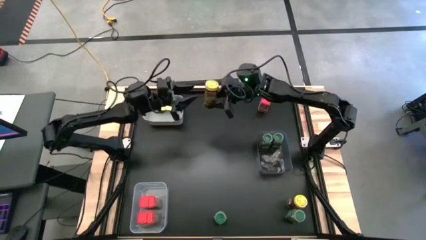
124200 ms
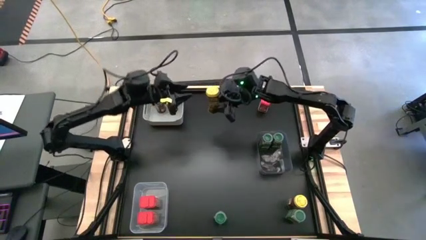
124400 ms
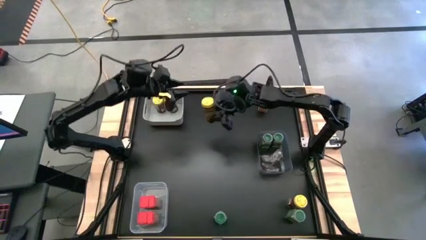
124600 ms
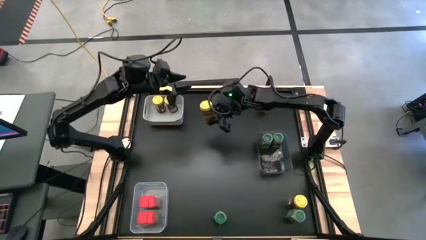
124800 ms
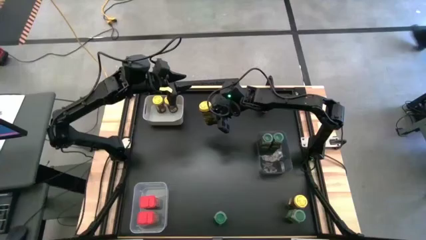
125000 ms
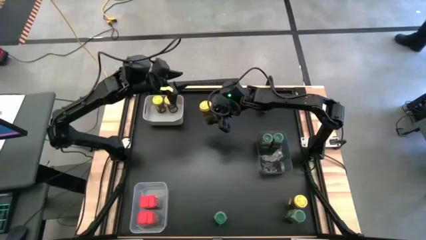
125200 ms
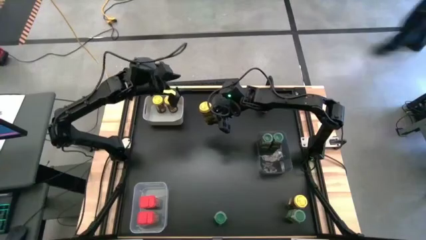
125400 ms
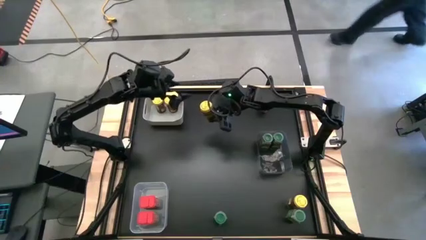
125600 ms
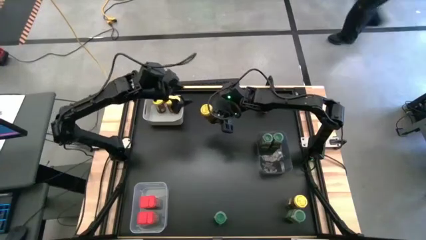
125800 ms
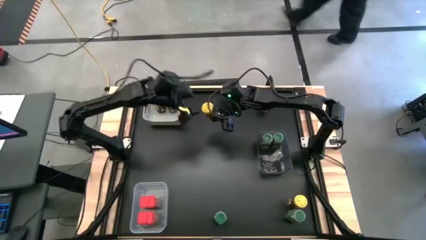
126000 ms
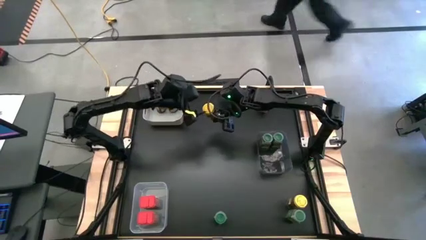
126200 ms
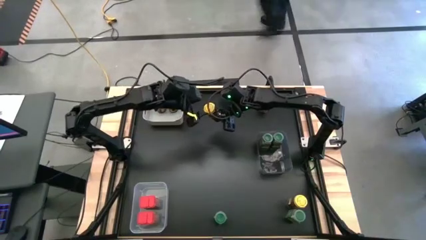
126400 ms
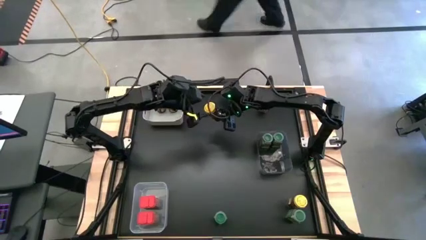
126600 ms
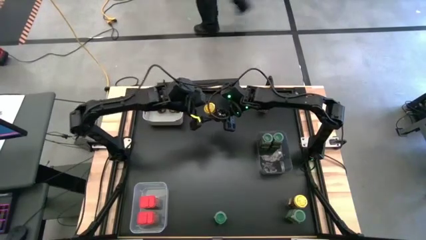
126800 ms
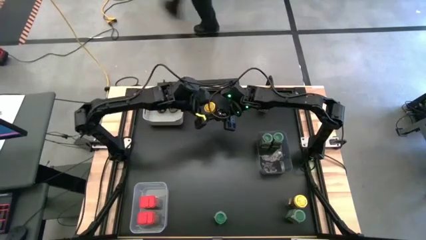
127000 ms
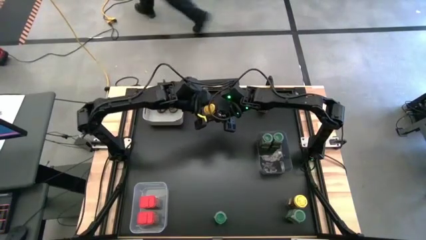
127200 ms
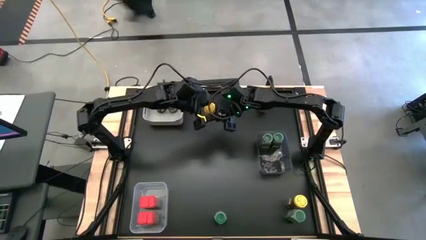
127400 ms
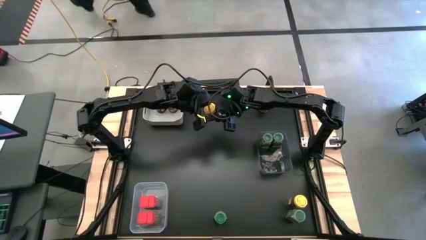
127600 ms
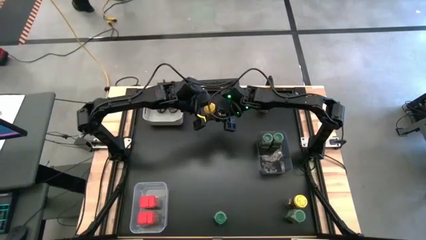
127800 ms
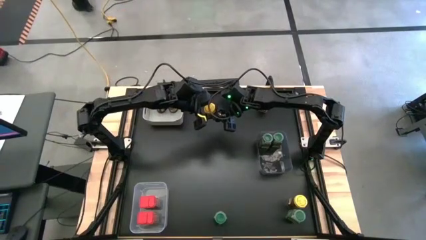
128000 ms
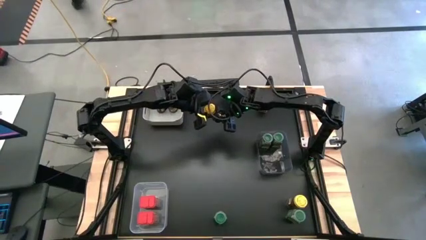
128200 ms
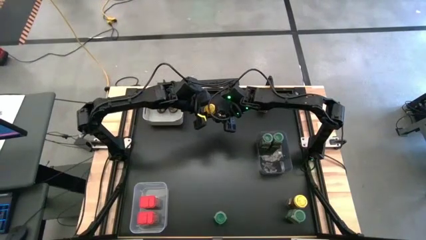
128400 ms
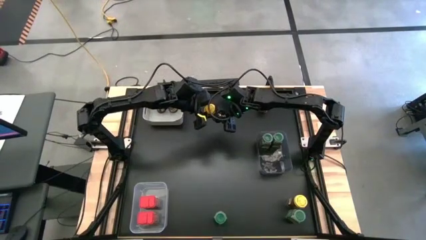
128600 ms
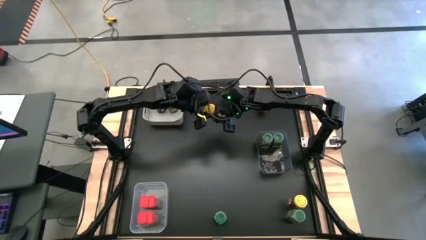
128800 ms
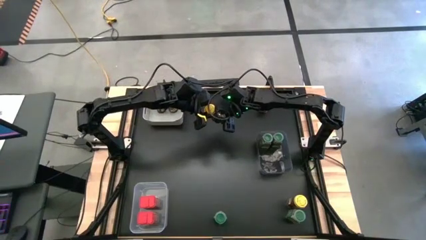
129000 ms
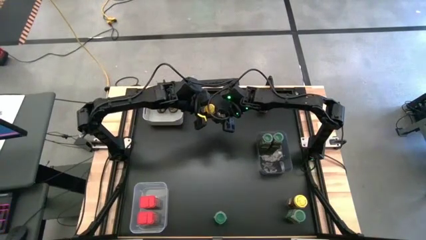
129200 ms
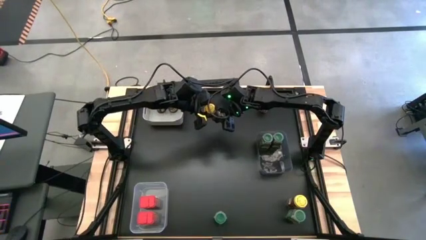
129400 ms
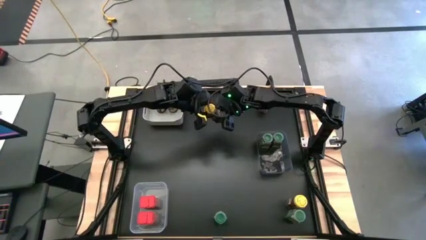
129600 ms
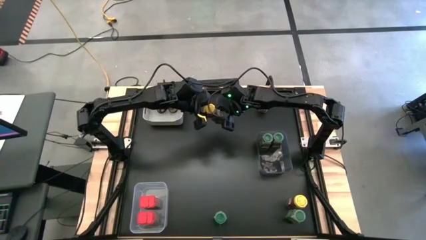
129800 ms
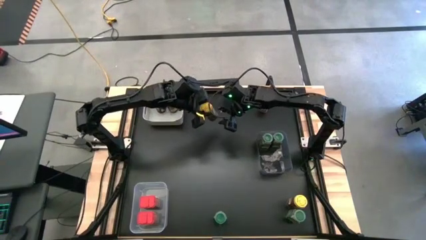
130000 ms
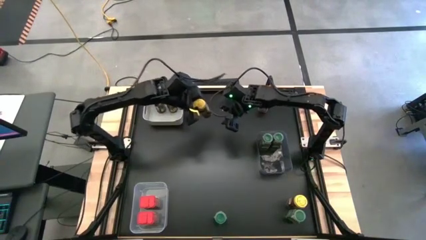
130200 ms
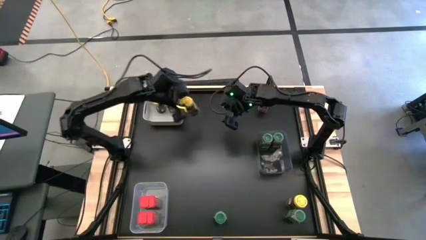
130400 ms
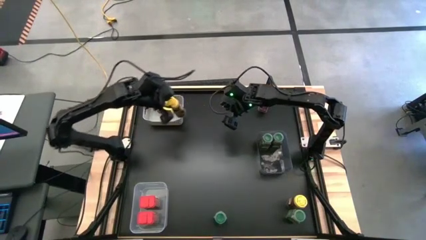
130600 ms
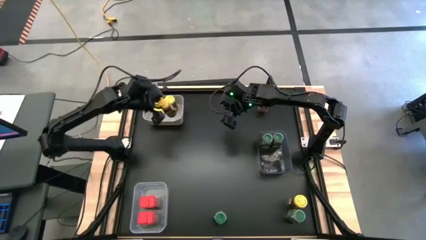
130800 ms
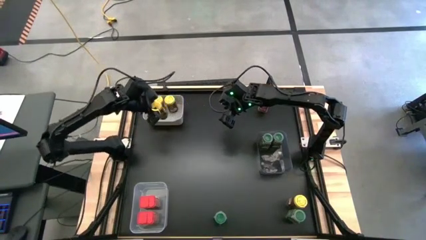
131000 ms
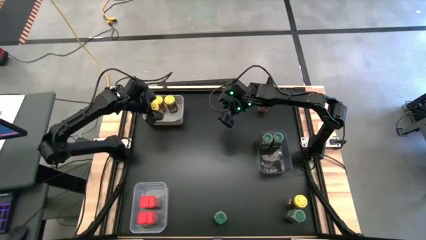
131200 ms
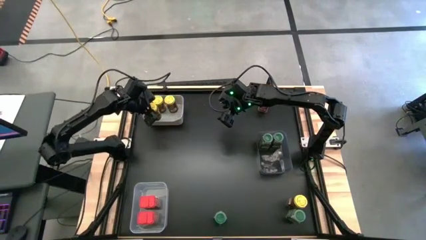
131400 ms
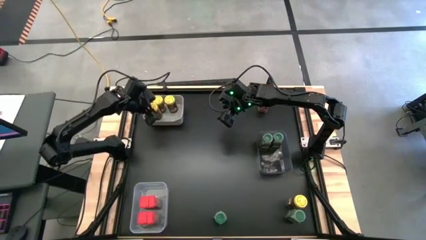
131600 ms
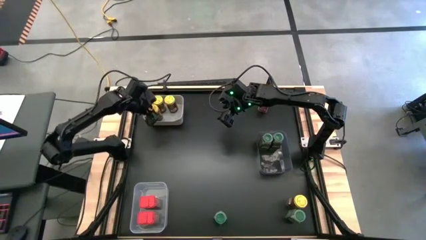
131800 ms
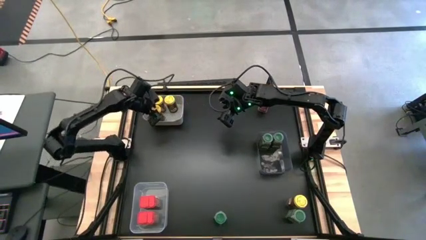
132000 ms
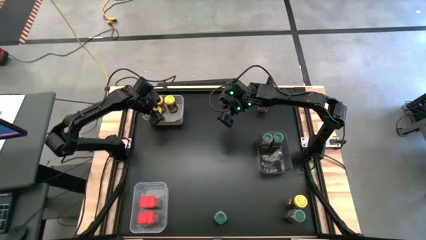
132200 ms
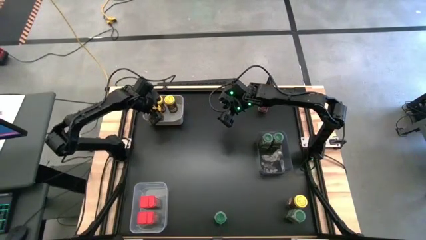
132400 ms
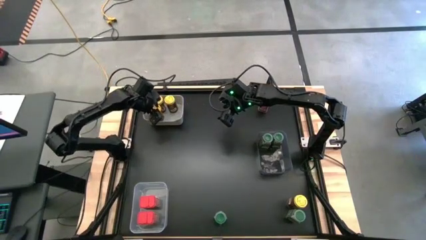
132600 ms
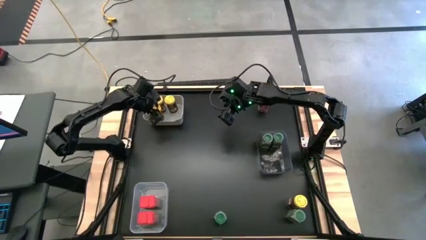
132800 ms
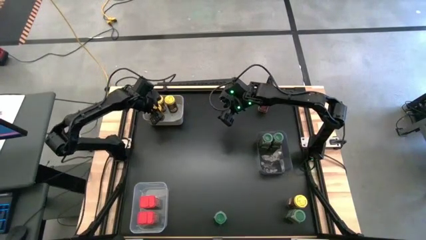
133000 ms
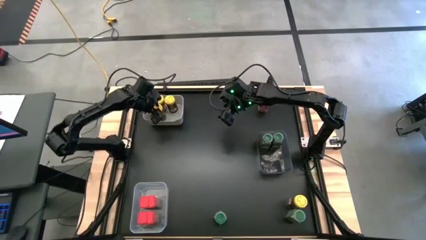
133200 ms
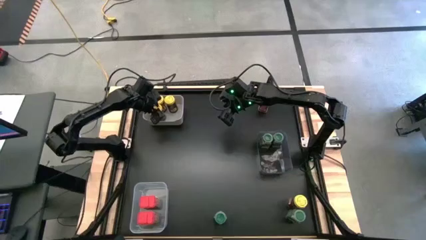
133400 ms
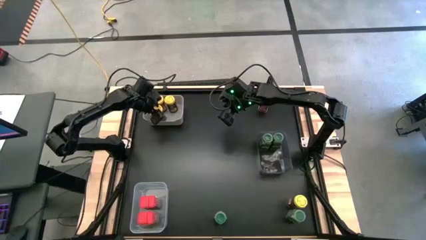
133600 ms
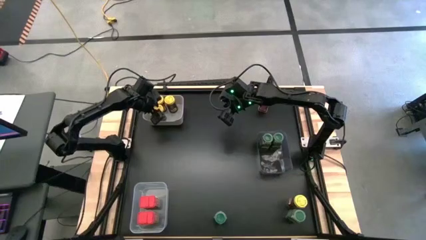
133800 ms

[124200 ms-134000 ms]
Task: Sort spices by type
Put the top yellow seasoning bottle into the gray bin

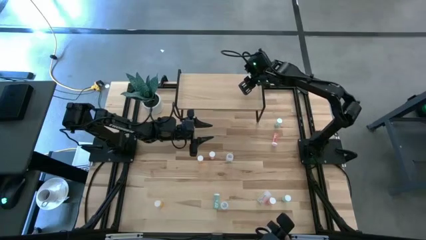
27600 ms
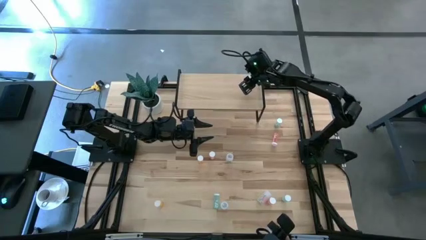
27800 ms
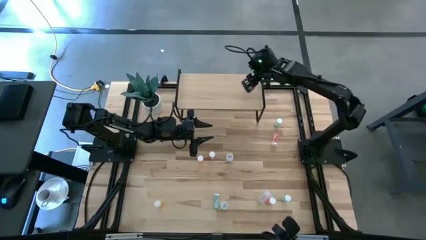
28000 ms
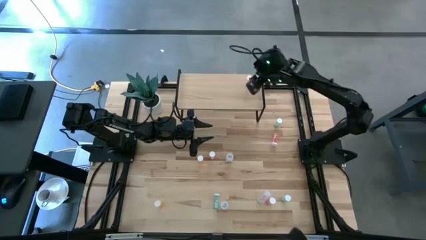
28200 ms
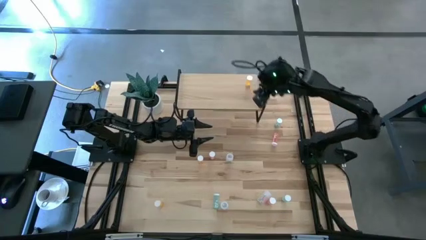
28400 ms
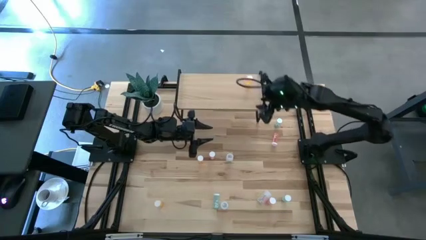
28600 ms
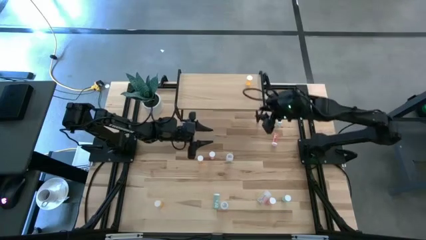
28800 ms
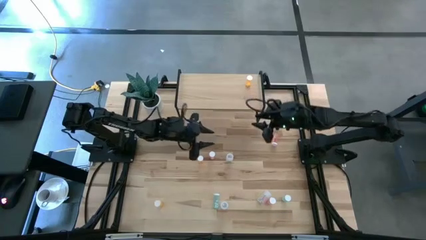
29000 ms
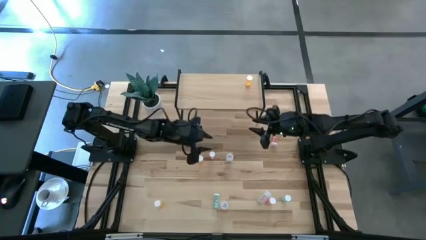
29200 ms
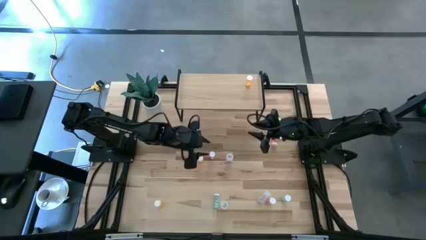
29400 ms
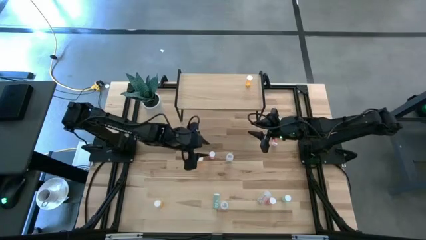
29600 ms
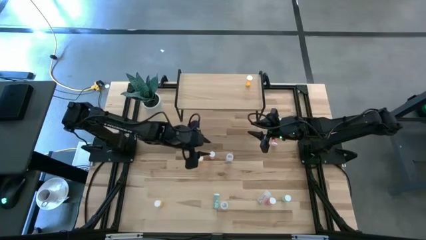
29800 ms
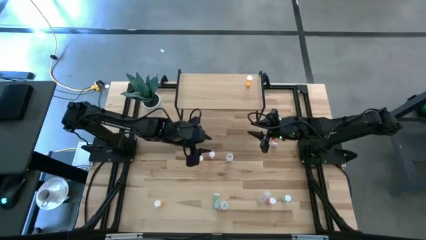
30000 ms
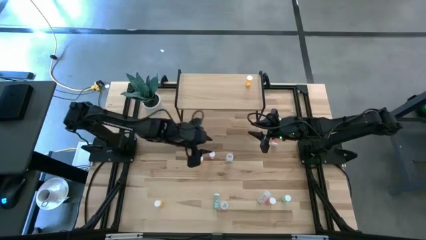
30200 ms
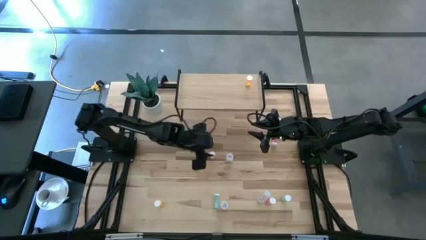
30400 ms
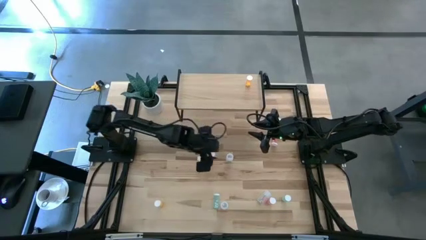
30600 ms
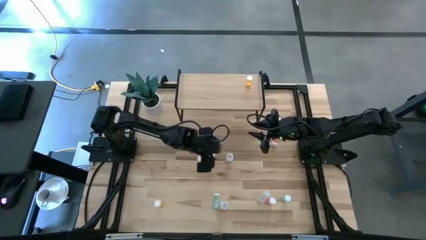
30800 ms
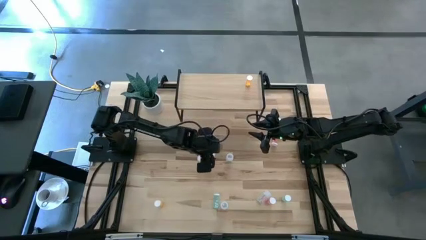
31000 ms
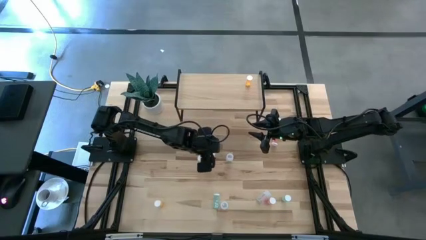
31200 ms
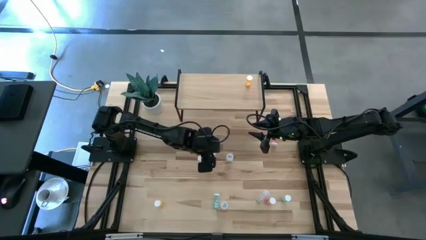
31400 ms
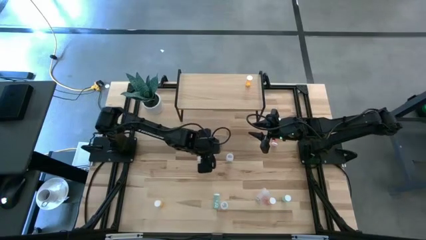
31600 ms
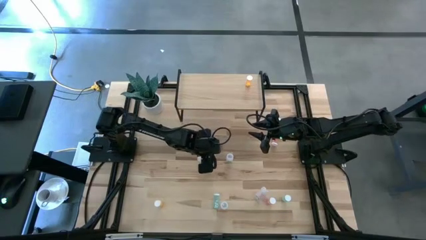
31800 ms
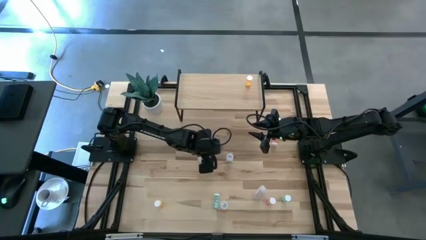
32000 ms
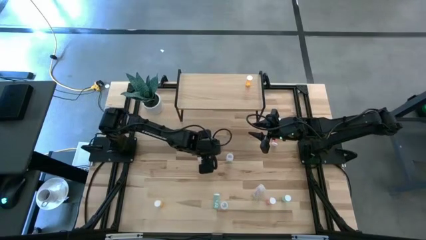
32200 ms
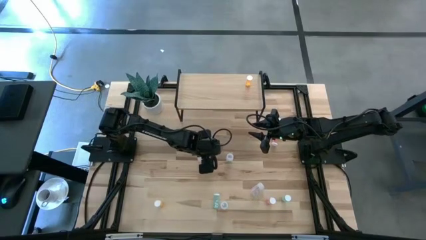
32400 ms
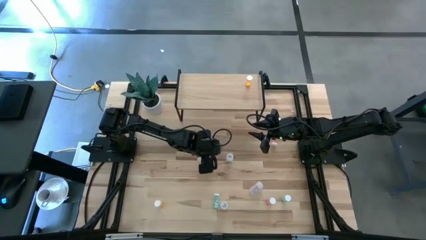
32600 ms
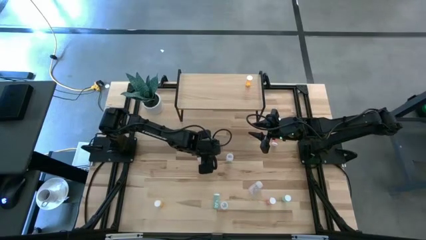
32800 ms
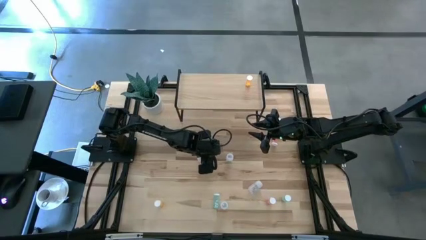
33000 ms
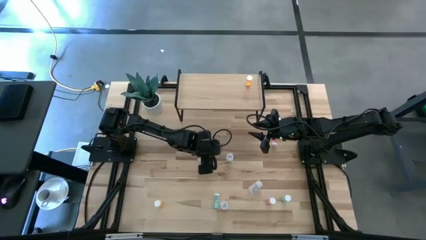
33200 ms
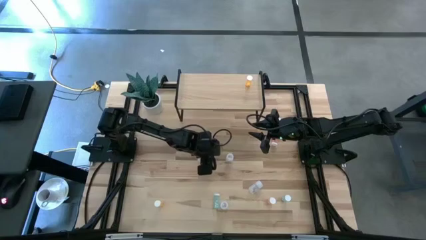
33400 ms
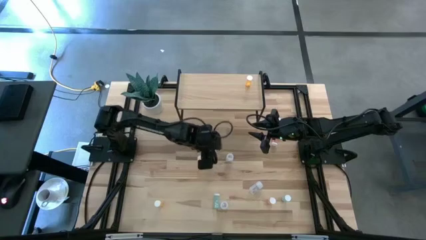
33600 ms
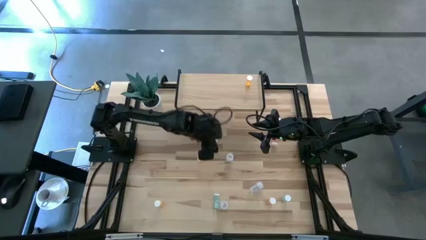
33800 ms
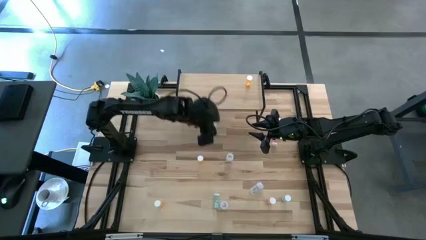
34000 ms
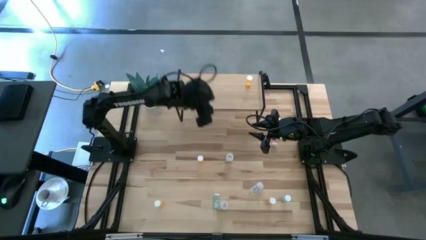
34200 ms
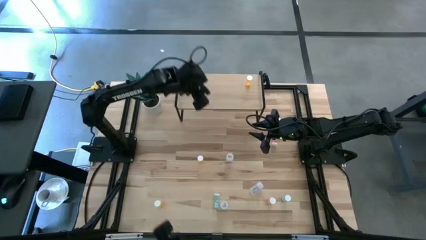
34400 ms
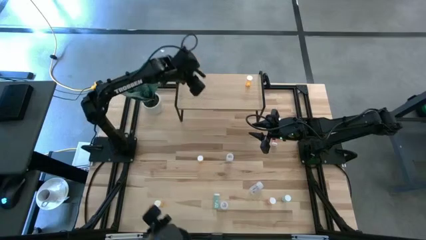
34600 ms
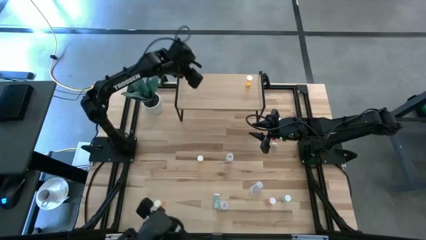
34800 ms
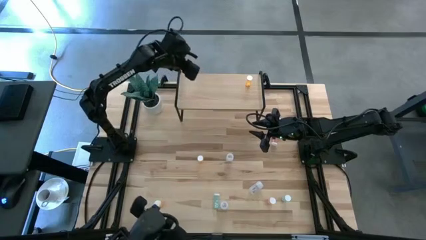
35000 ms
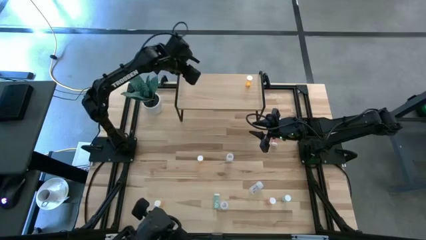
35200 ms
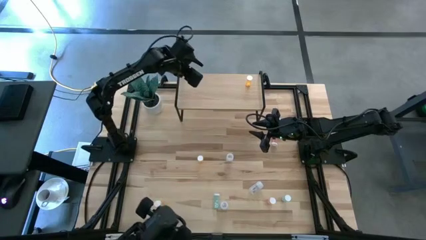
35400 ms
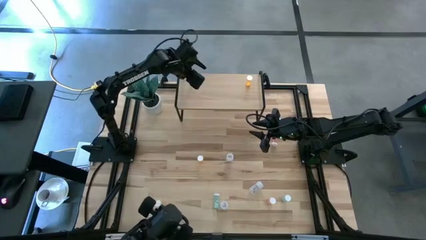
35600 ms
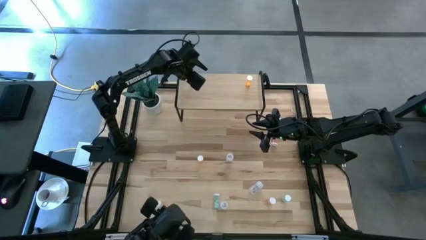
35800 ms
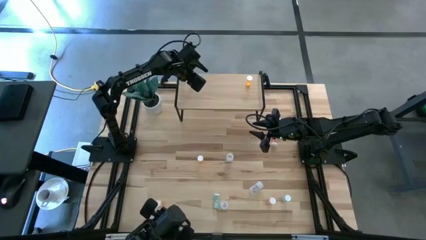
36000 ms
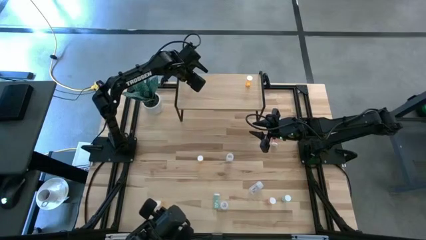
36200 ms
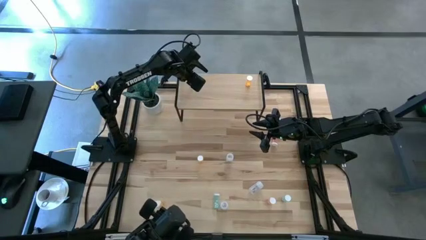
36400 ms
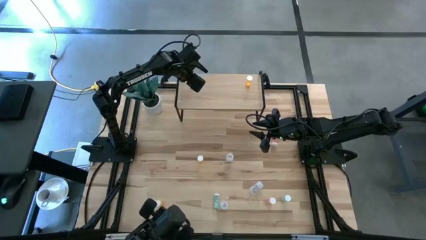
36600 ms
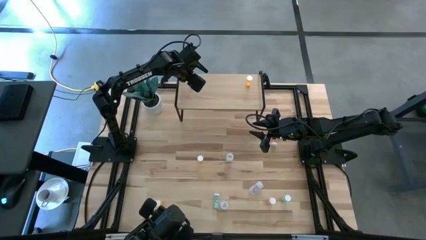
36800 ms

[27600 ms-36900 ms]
Task: Pick and place medicine bottles onto shelf by color
Put the top left pink pill bottle on the shelf
